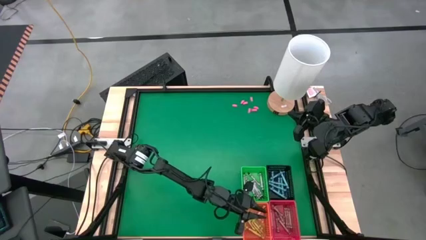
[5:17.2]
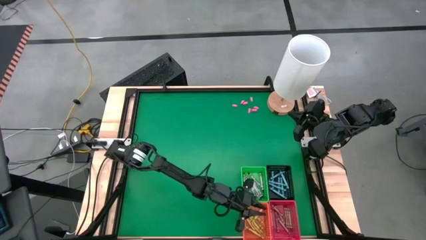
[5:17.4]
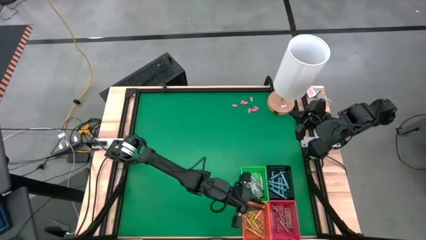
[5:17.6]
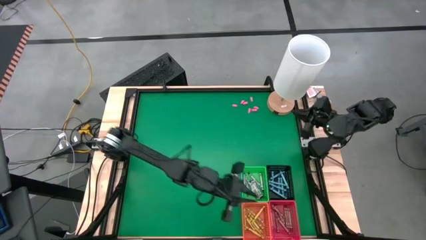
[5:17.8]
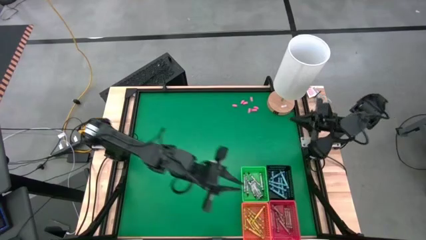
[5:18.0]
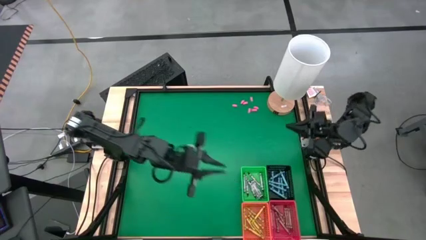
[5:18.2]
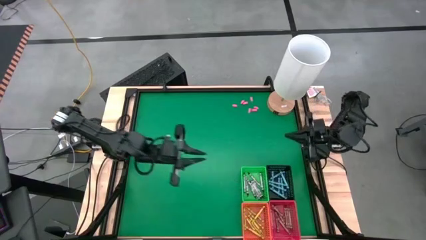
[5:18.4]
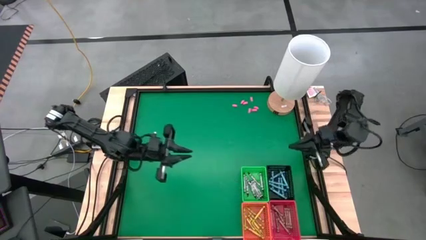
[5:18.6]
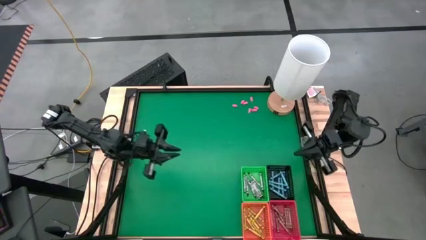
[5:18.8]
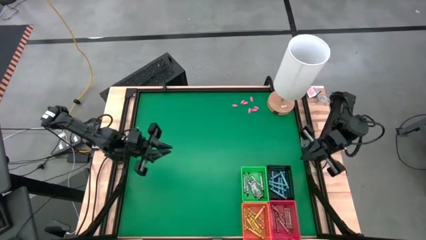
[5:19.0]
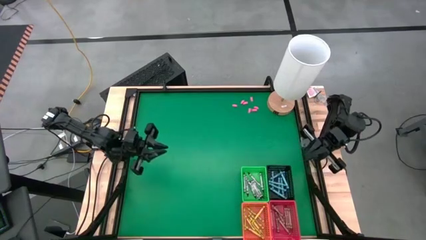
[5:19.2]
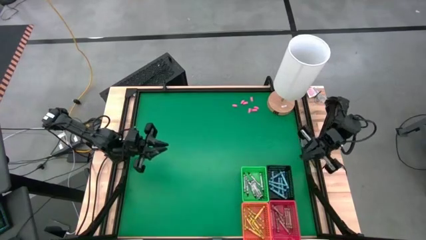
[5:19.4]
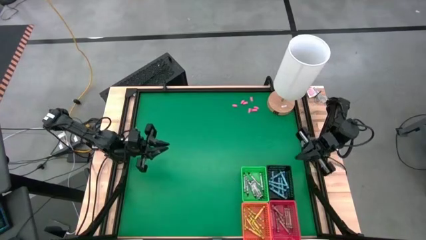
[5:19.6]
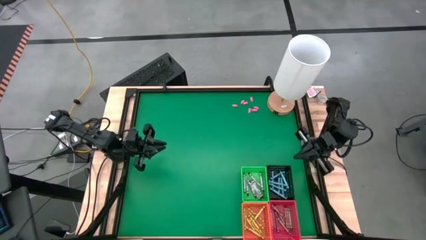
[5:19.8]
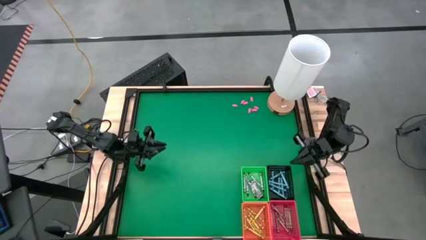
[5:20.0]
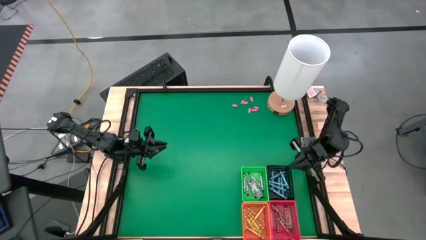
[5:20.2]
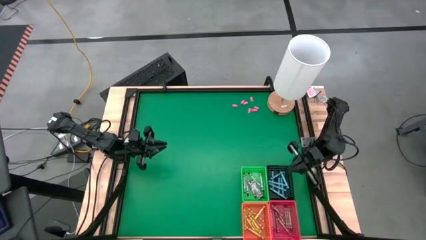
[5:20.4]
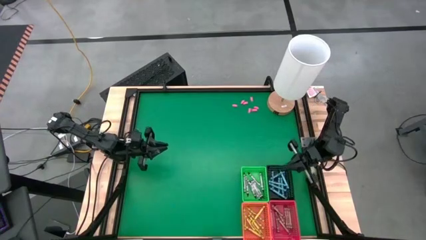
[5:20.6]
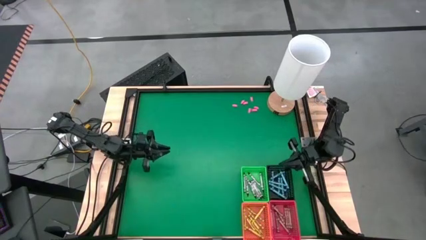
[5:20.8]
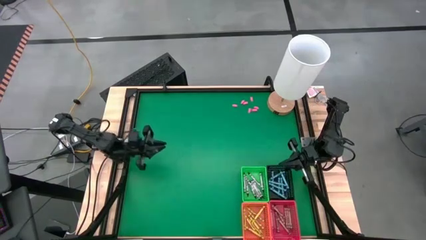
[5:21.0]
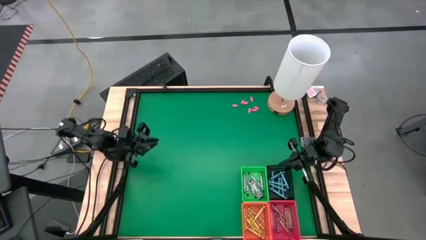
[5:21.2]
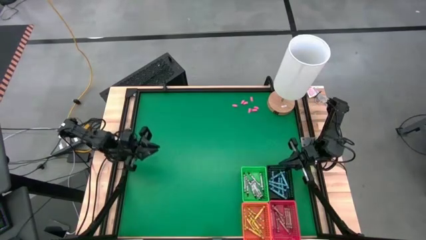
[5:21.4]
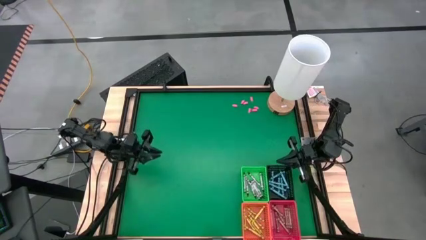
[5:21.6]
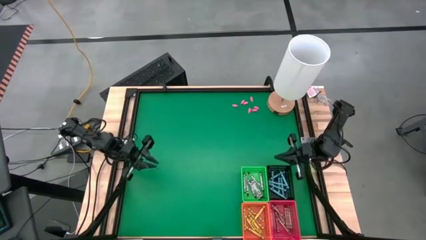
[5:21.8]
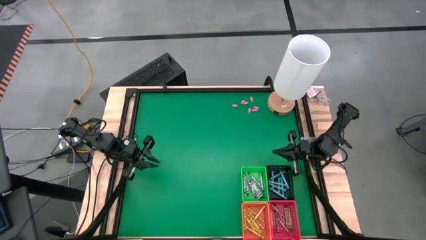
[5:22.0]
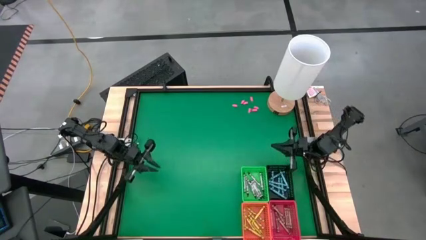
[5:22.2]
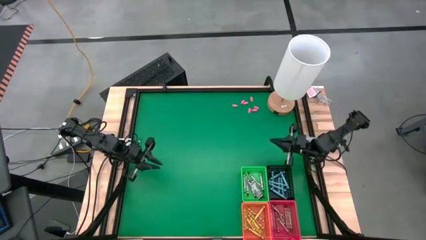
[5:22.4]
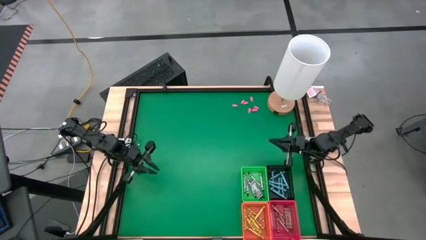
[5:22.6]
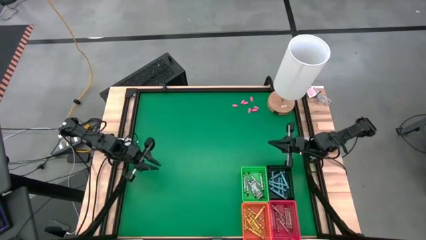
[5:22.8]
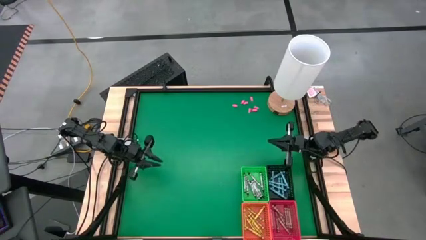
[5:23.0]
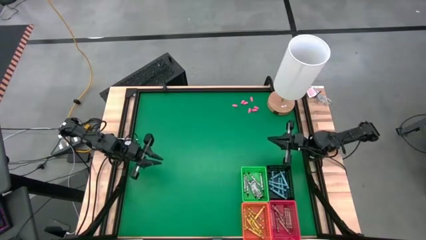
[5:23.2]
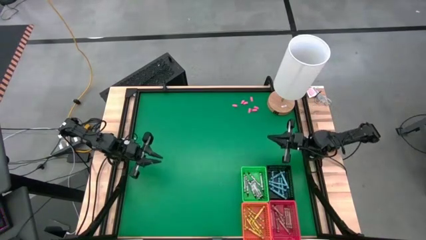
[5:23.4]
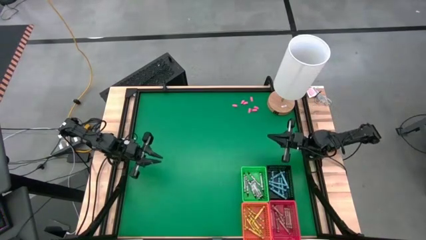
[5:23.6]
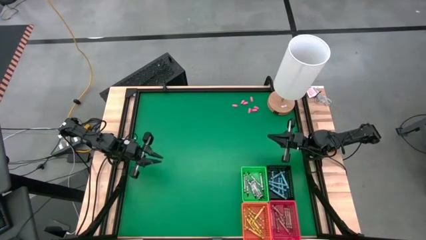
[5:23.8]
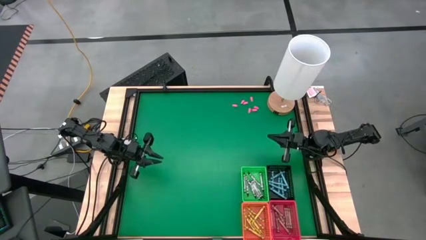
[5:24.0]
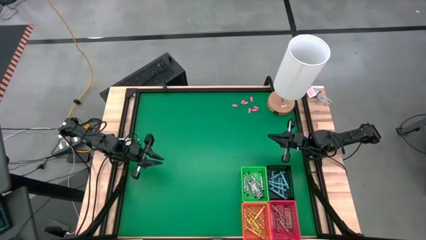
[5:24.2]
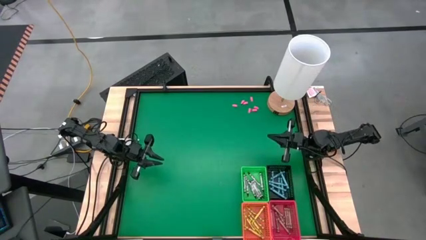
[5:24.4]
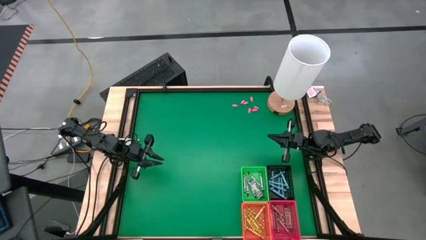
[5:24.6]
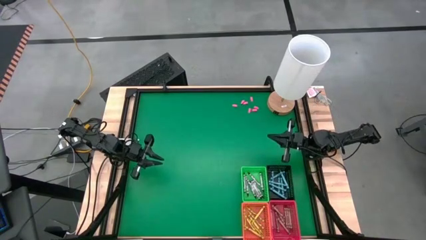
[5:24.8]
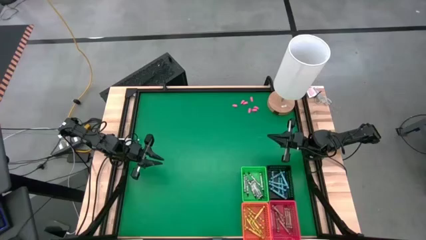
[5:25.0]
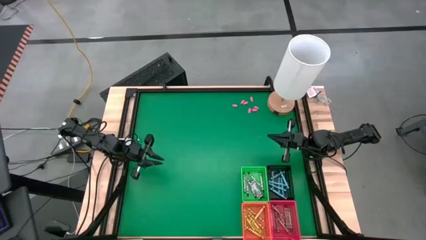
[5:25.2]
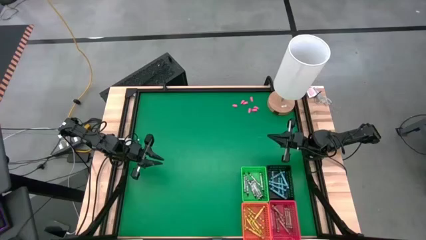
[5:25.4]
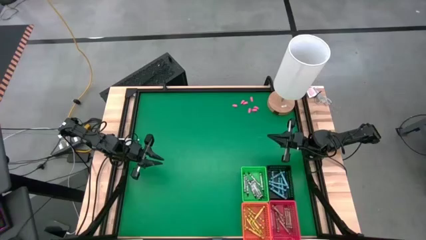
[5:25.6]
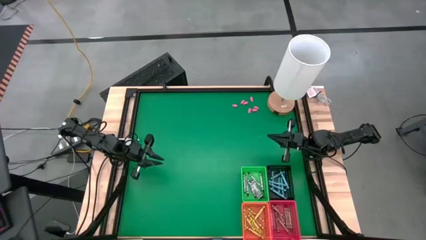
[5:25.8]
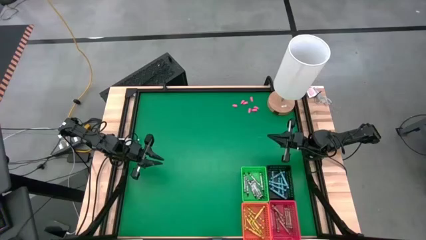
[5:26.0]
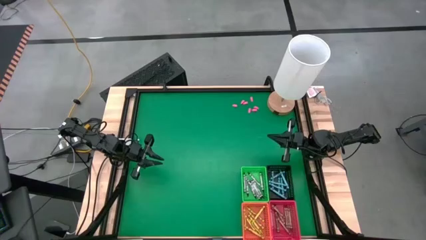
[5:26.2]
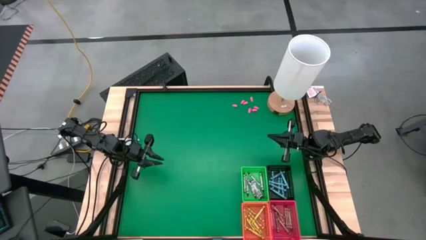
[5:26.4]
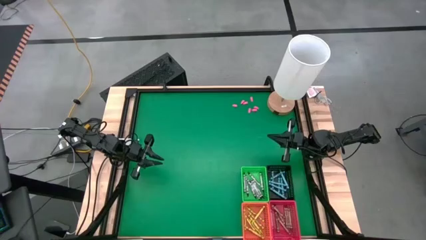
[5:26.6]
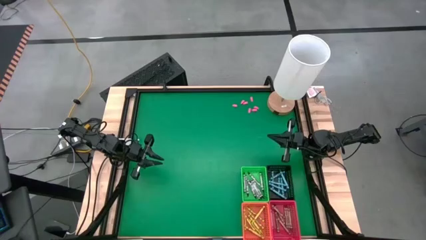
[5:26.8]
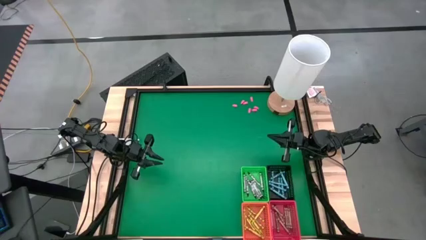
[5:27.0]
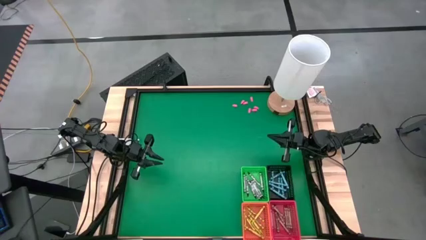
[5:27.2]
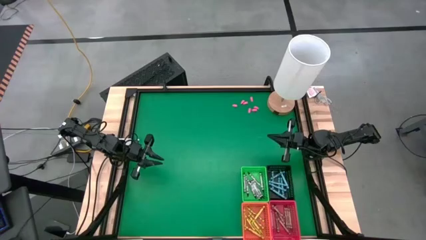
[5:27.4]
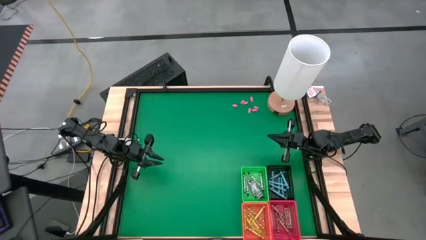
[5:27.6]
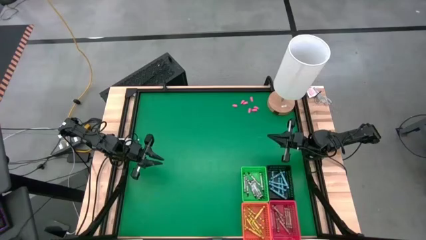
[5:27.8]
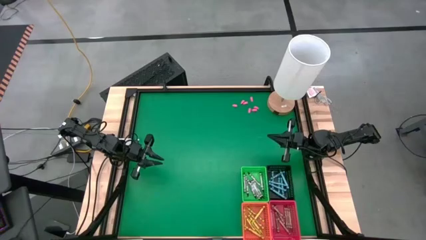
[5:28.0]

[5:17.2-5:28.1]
Task: Sort crayons
Return to Home Position

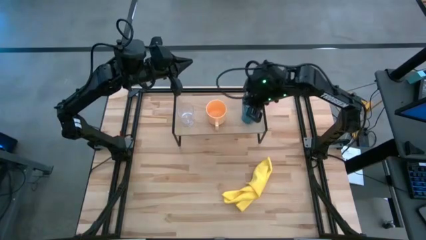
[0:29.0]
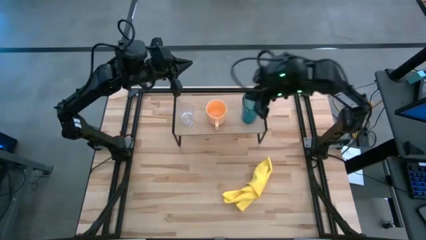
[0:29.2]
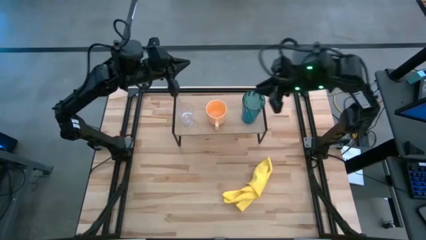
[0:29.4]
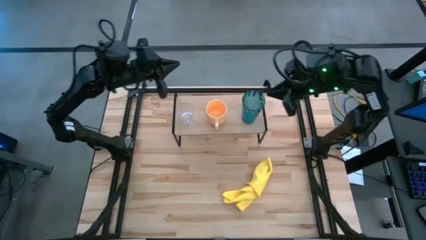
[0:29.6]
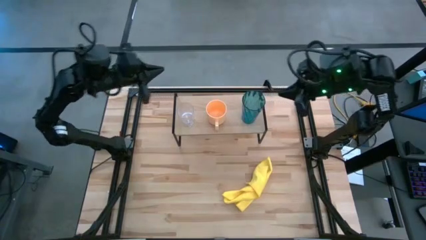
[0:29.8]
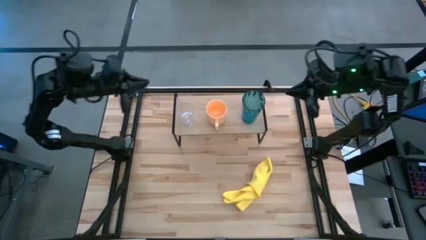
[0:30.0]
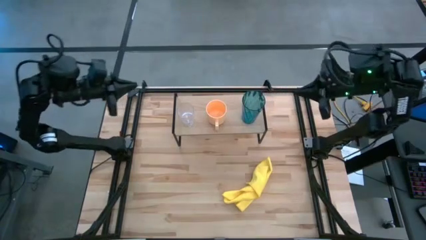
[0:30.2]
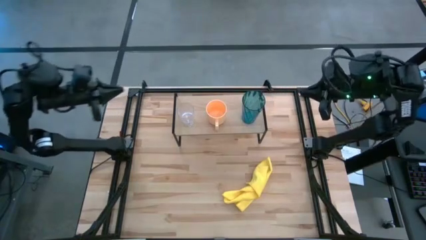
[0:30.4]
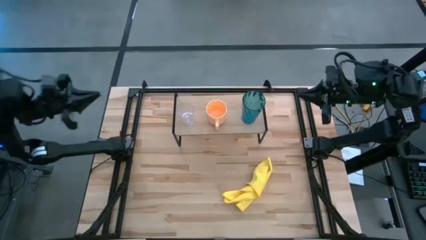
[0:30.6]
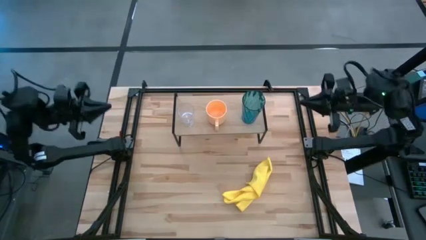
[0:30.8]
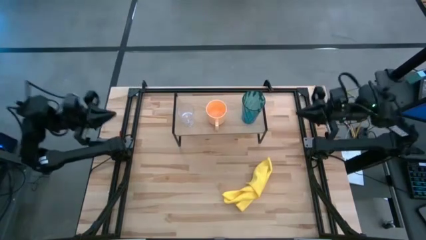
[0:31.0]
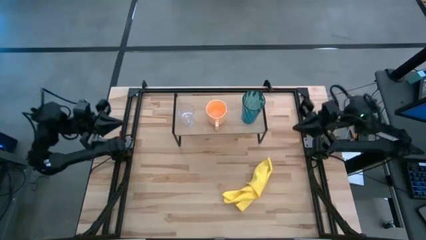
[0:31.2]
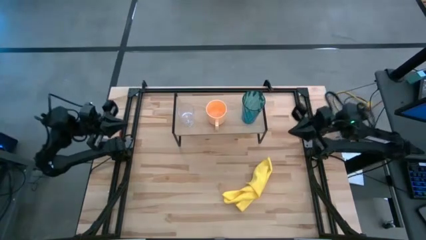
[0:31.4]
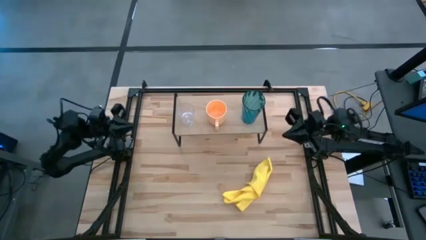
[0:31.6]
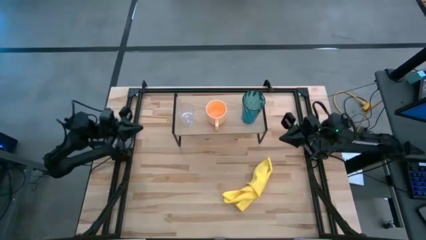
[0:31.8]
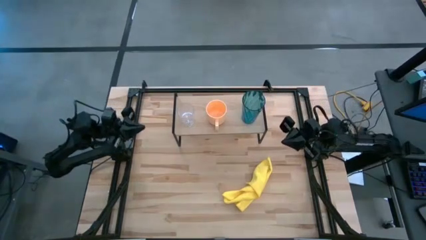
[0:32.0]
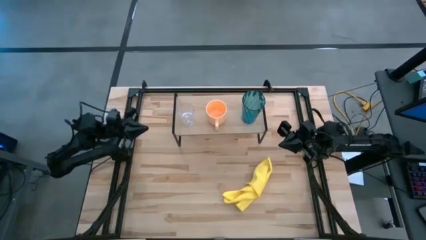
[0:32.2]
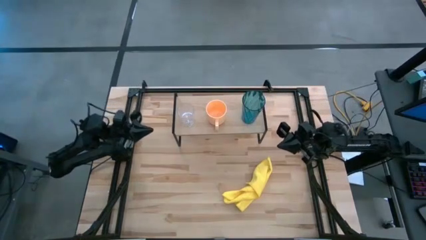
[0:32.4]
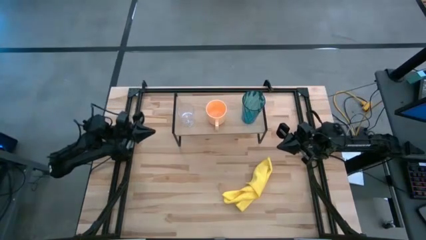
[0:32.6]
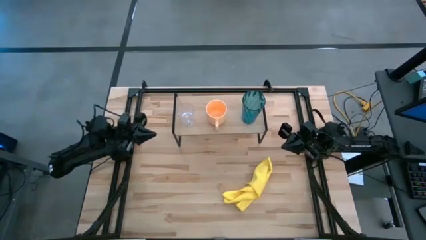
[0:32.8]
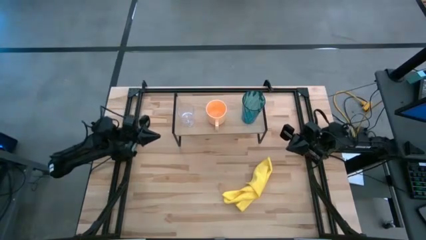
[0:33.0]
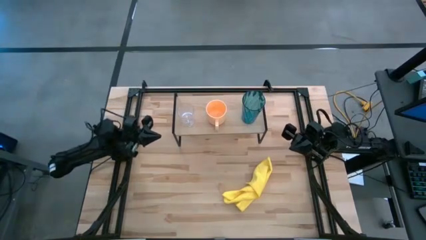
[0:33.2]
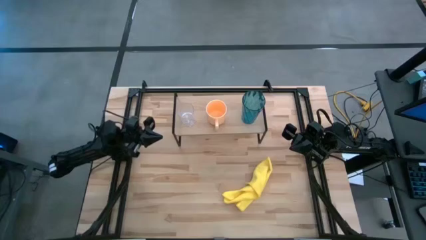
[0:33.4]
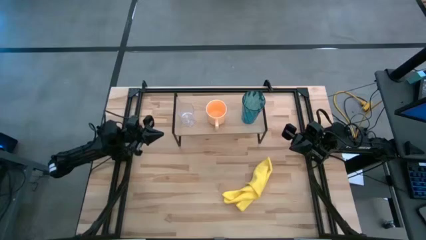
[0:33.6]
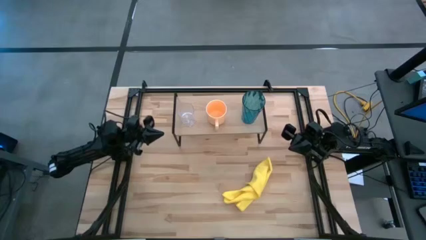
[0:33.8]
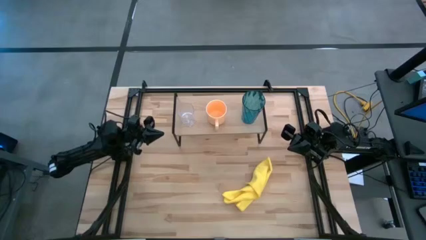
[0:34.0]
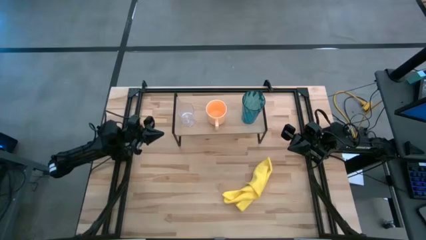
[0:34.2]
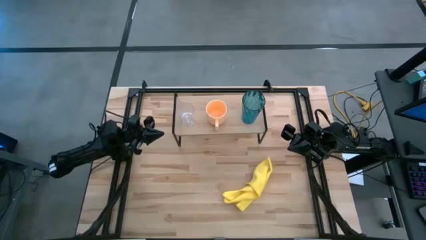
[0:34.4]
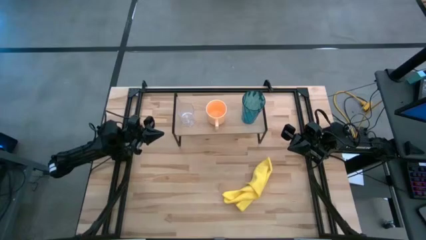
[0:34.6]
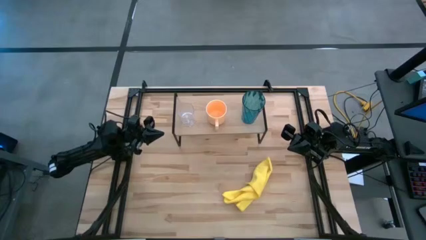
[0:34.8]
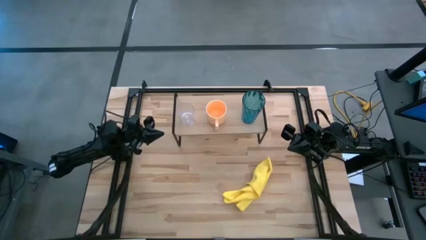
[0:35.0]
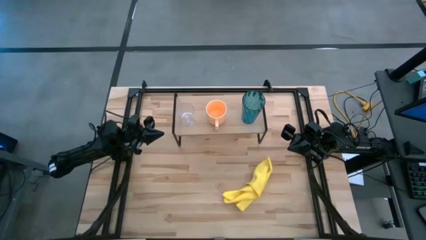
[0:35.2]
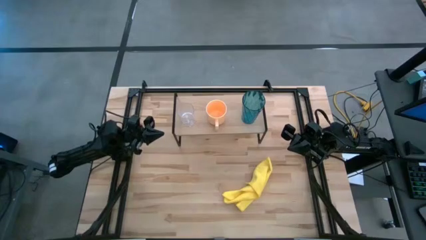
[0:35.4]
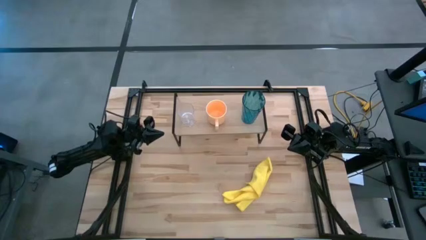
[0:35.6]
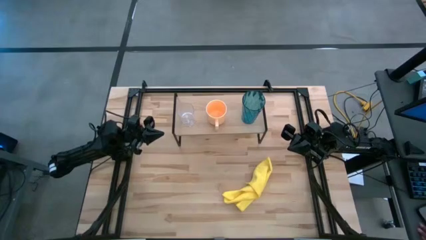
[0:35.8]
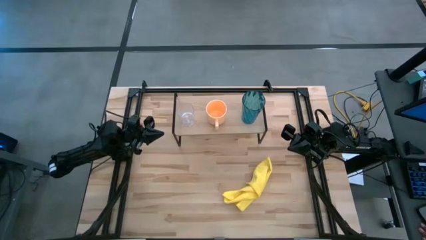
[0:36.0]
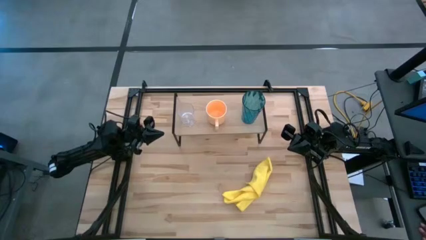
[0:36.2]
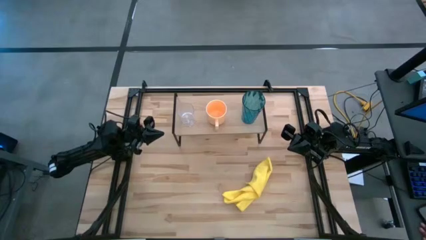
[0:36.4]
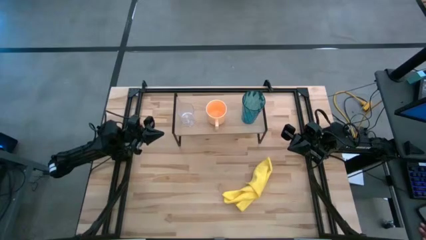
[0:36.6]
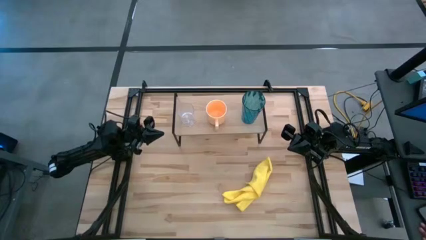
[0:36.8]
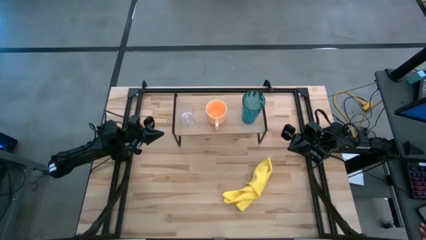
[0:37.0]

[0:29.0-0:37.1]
Task: Stack small to large cups/mugs on shelf
Return to Home Position
